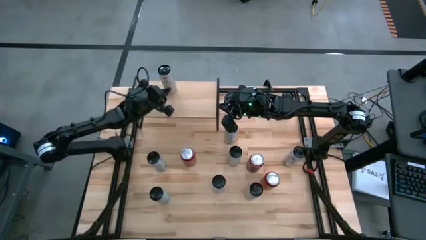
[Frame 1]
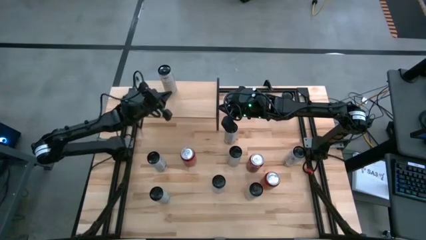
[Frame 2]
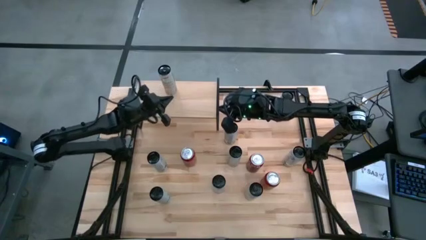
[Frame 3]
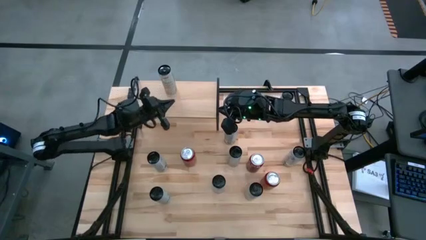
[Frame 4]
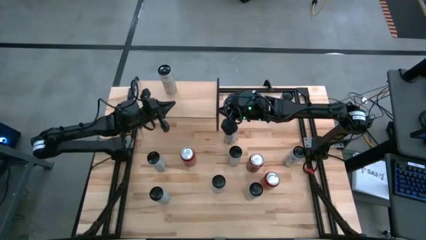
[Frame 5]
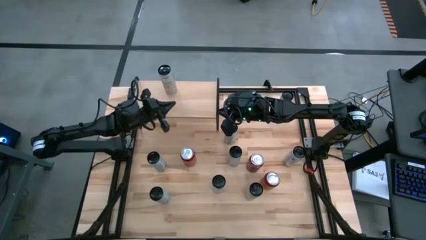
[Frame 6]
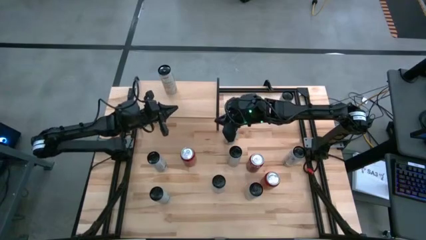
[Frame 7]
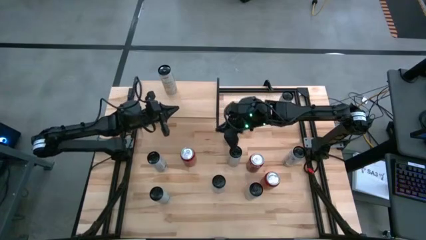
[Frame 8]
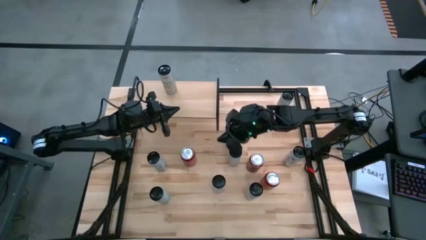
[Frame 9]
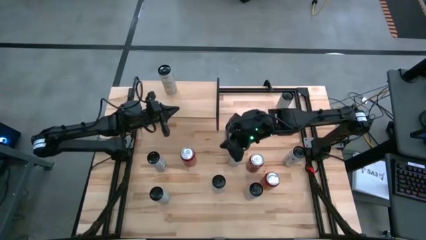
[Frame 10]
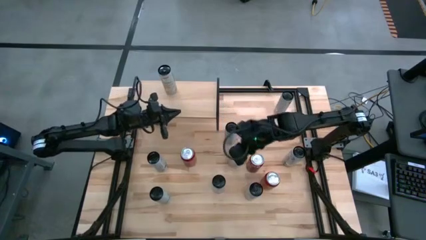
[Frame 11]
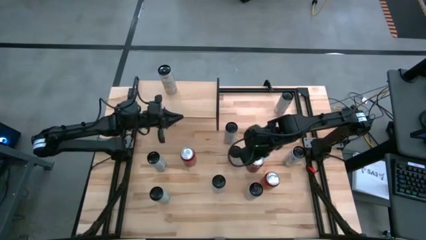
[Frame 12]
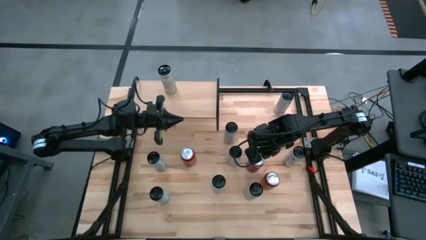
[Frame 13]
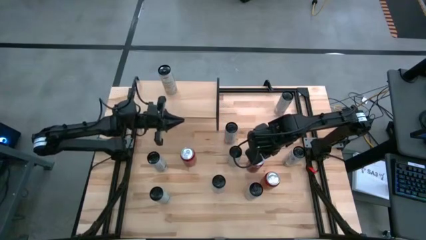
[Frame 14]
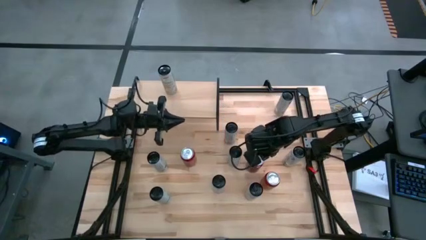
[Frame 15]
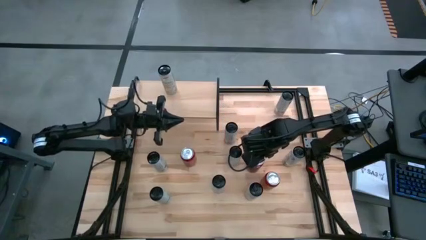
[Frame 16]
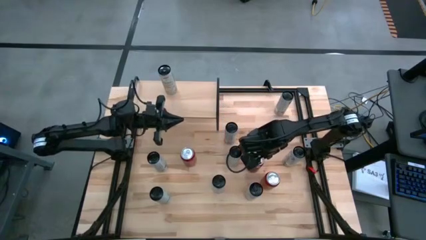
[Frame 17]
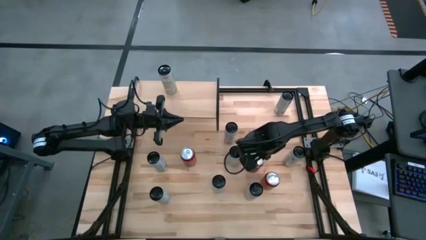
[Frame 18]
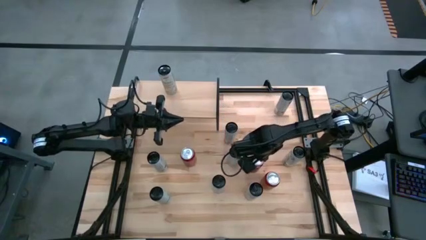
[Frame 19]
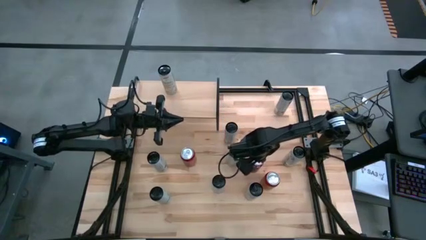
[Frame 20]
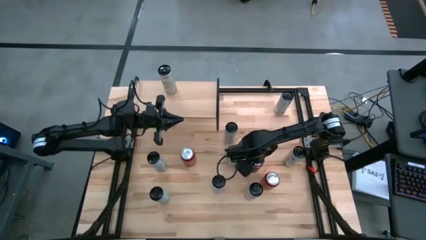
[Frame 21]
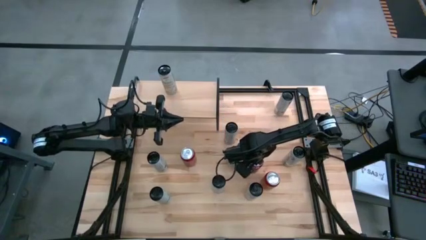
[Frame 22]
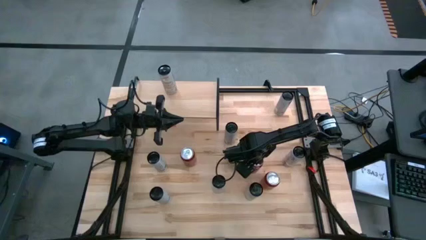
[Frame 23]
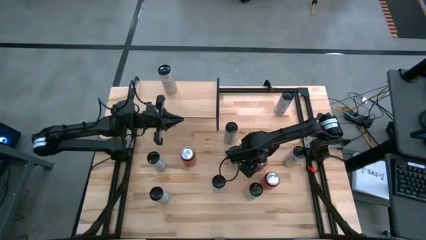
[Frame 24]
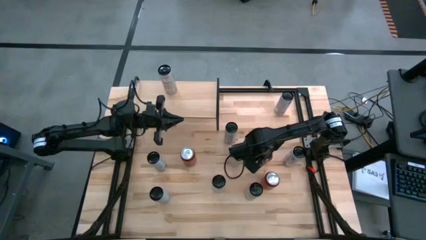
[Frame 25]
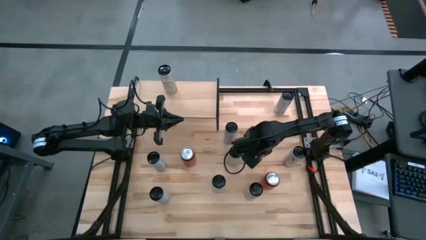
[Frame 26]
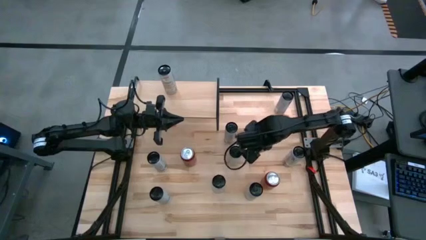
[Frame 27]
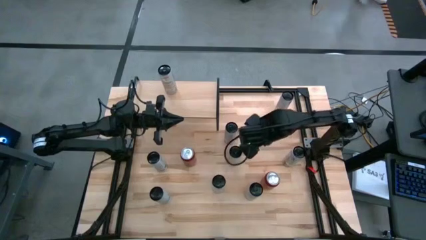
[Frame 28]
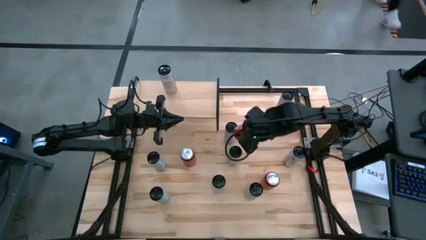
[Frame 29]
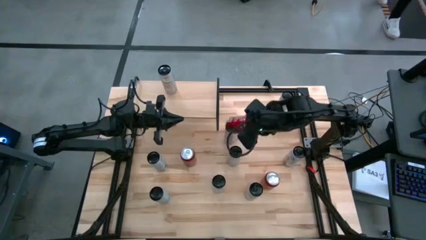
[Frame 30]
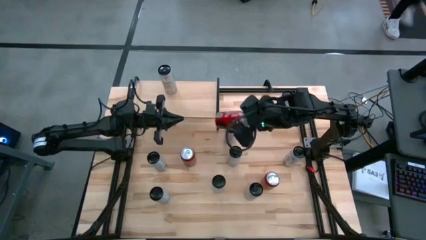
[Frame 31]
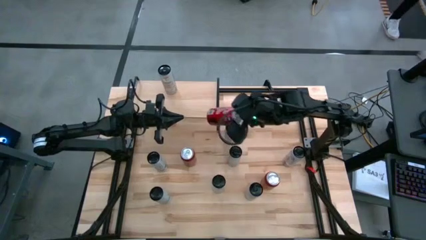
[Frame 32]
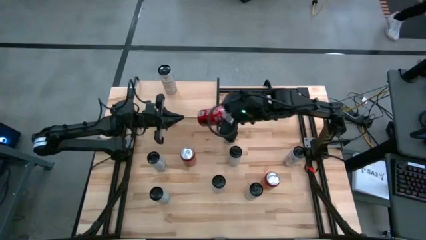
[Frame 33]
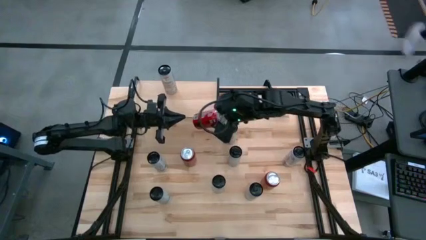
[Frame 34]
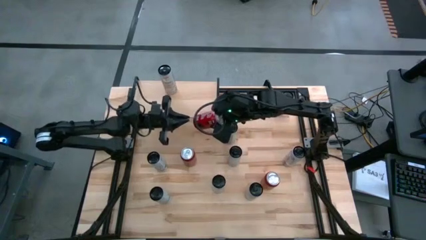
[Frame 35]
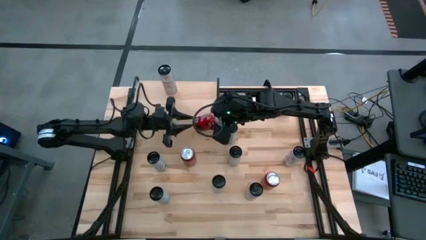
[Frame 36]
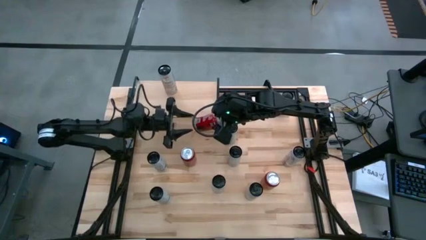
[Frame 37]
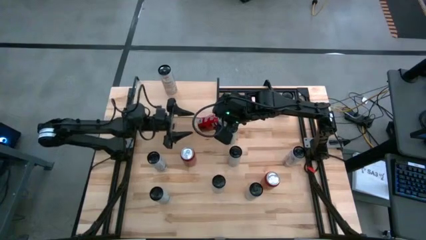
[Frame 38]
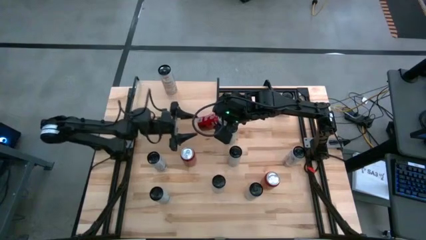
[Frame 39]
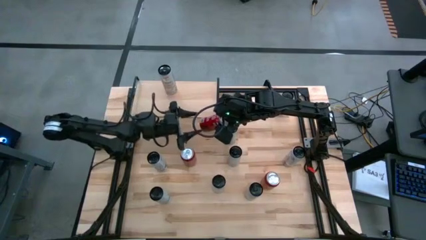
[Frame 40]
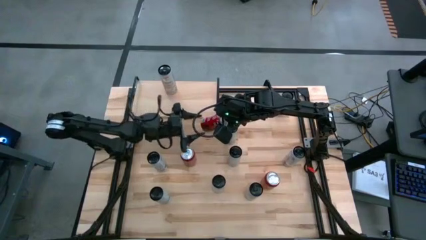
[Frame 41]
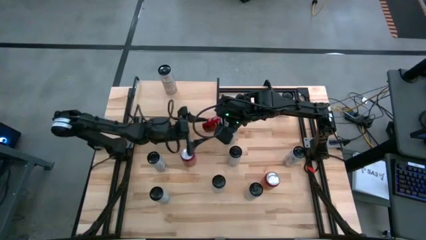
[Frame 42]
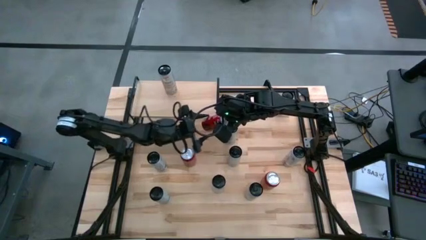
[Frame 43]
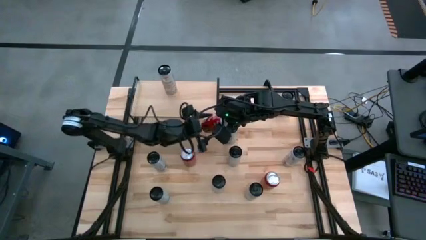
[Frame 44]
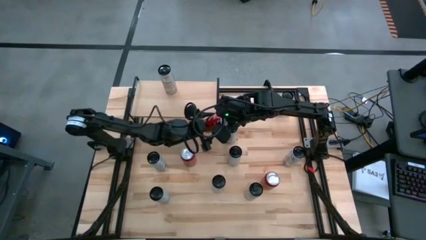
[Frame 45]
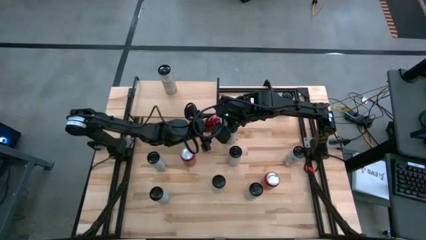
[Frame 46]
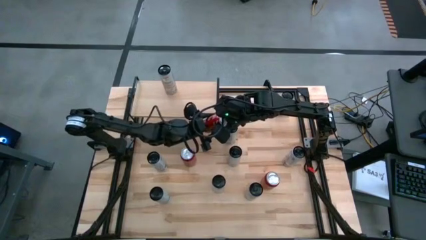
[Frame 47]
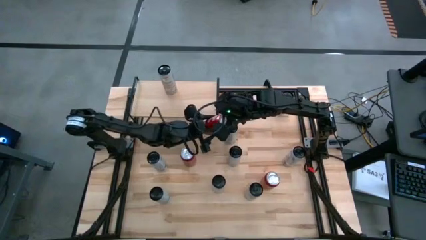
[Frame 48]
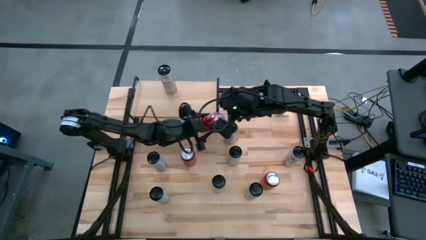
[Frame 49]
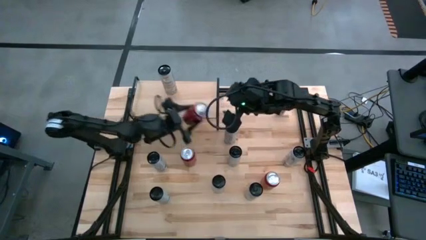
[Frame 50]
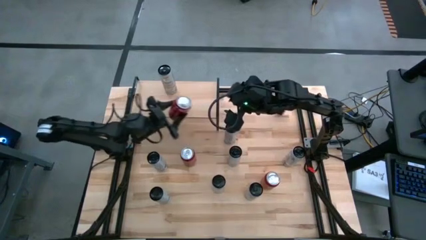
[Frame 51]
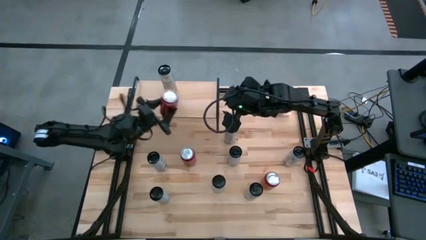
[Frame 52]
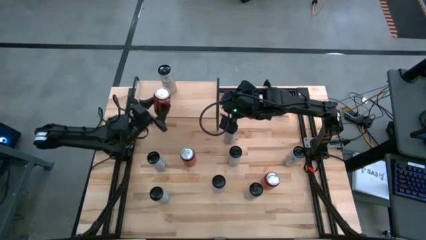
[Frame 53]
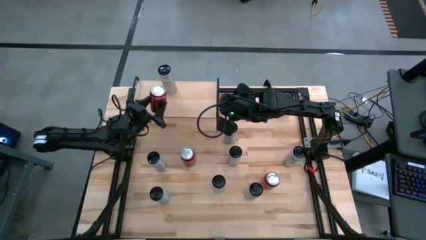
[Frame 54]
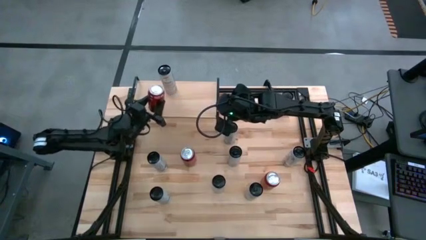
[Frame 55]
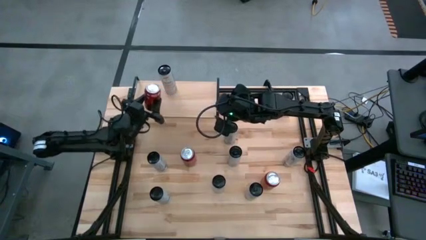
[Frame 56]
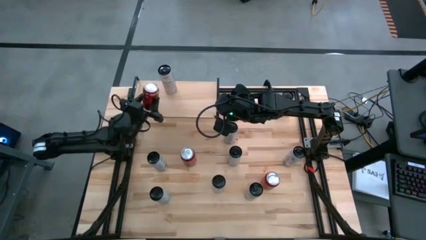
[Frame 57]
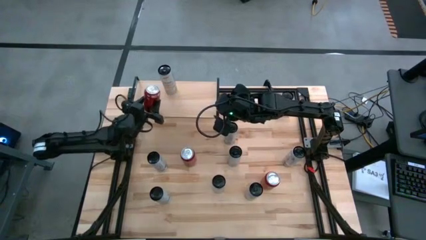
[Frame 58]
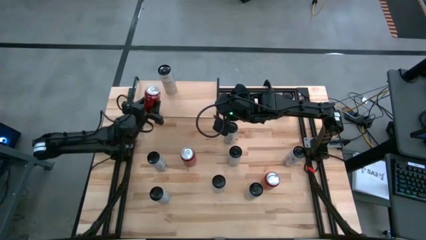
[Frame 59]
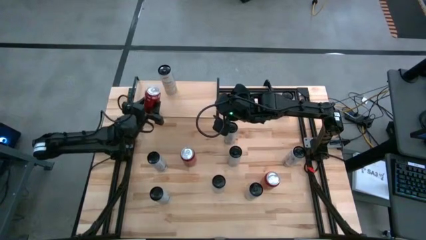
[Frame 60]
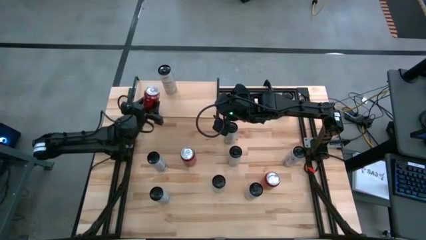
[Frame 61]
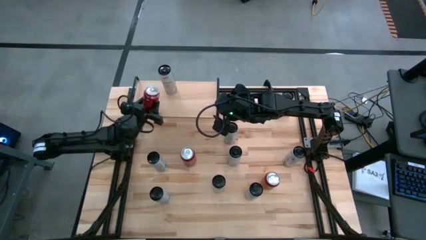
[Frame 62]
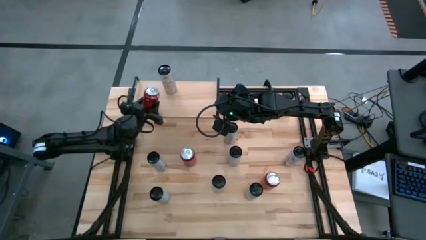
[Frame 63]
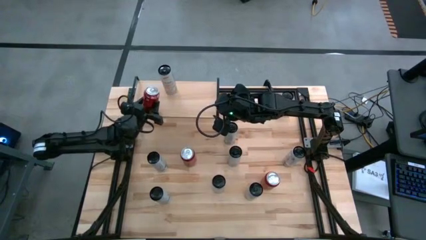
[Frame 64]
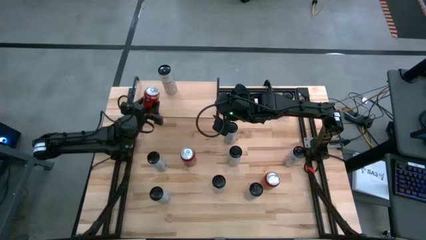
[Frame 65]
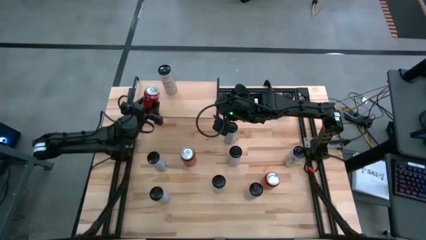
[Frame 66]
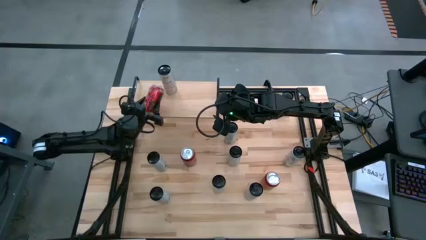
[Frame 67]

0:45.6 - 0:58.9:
Task: Place canned beverage on shelf
Put the top right red soda can on the shelf
